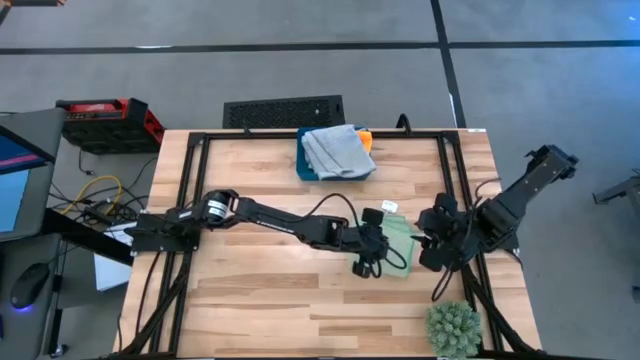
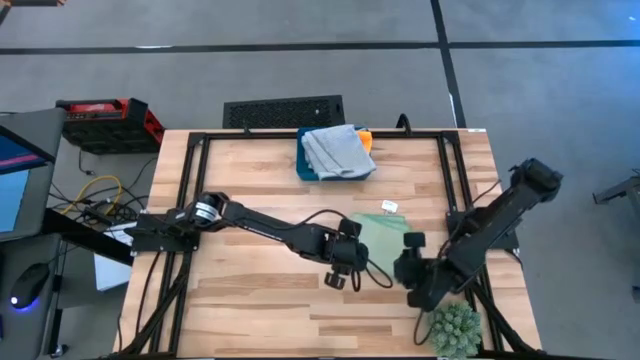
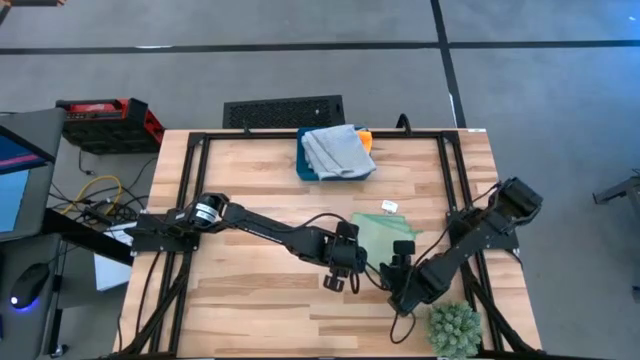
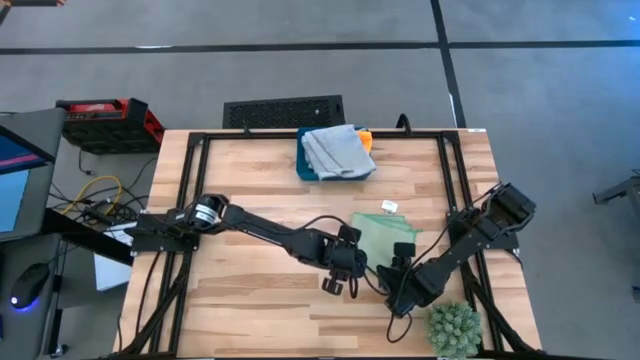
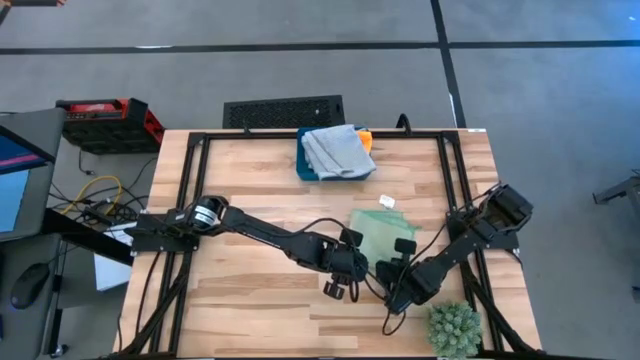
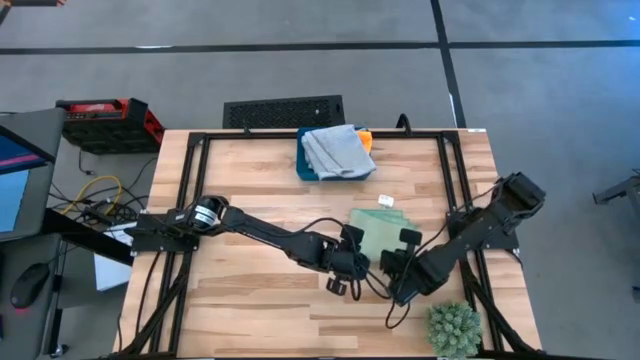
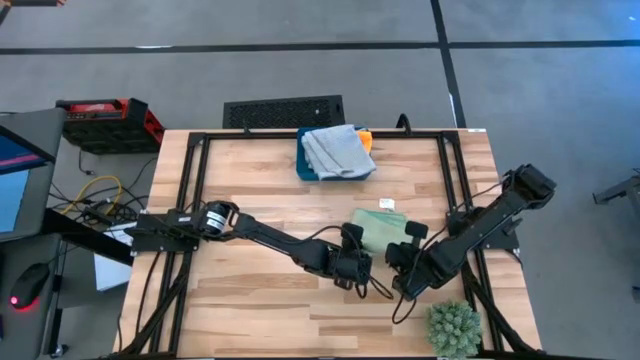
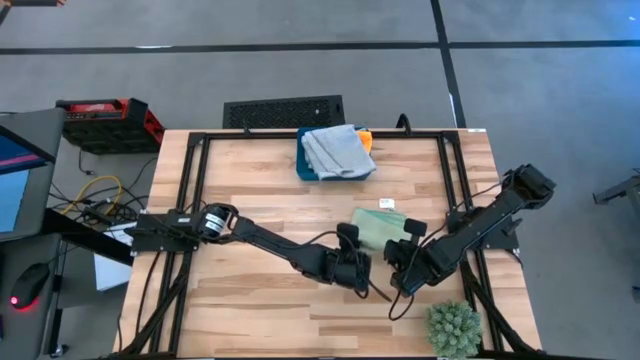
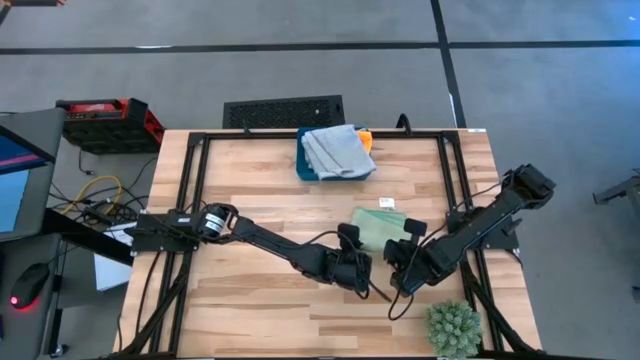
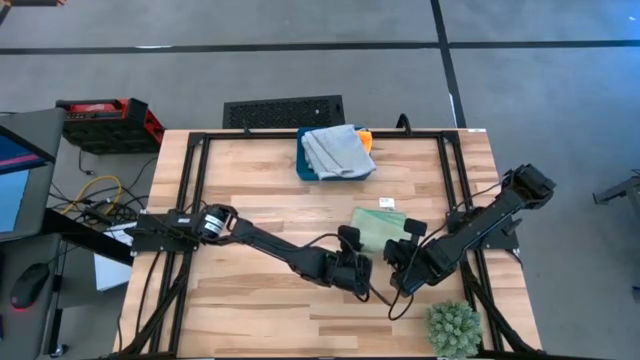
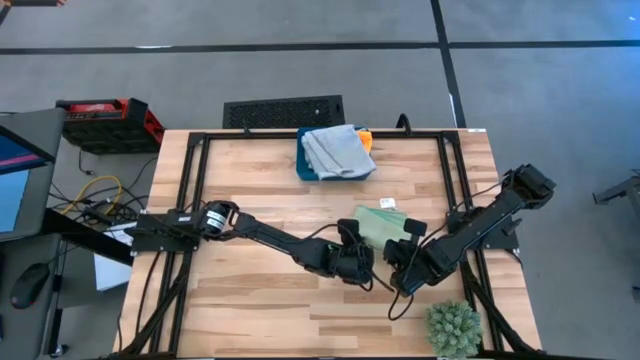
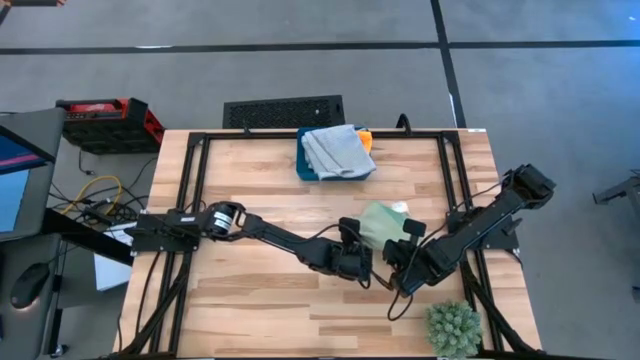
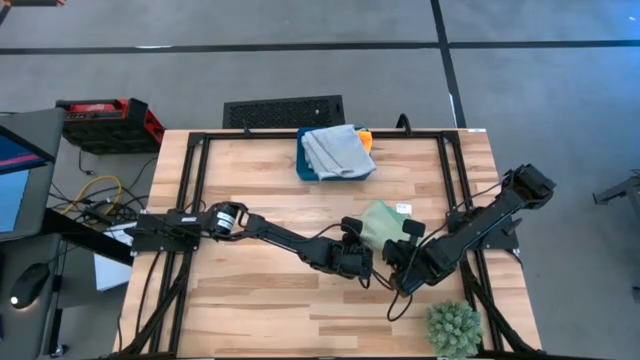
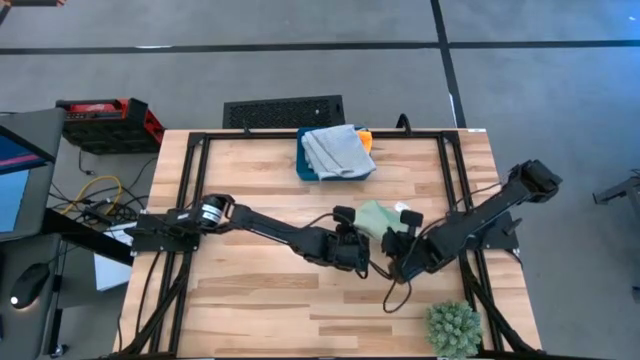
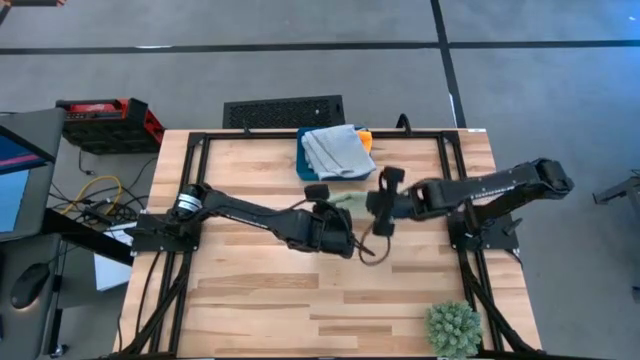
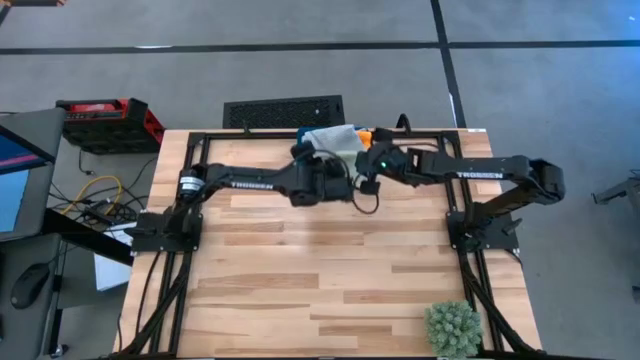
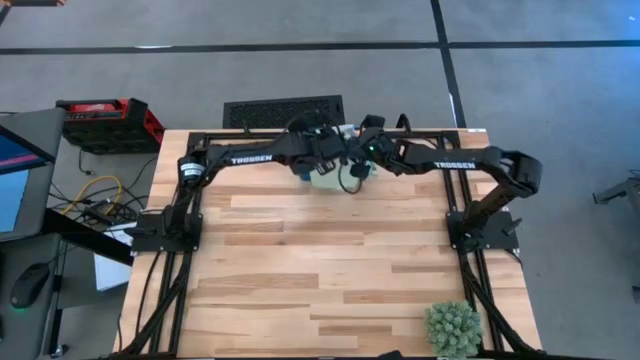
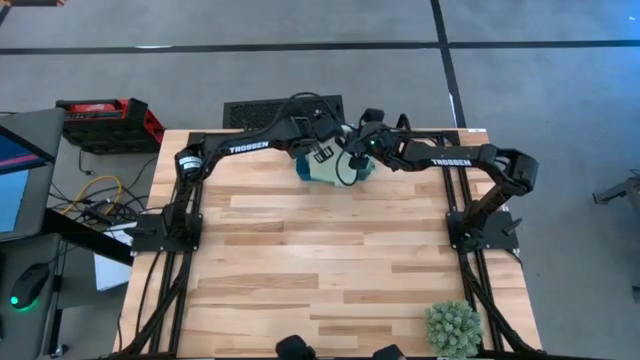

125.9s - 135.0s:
Task: Fold microfiber towels
Put the folded green microfiber cloth into the blue bin

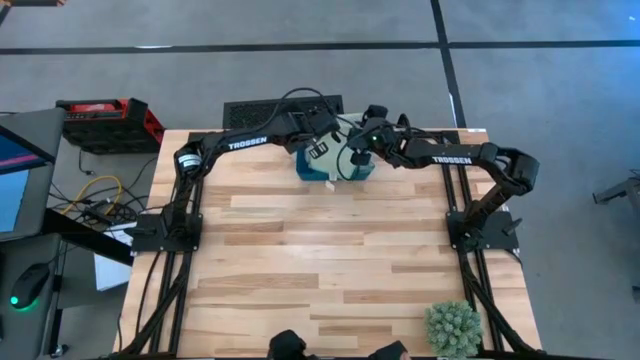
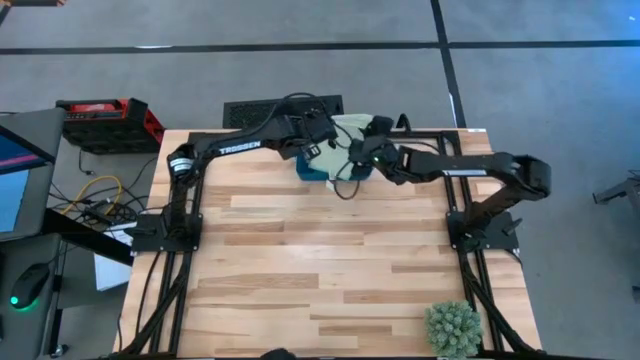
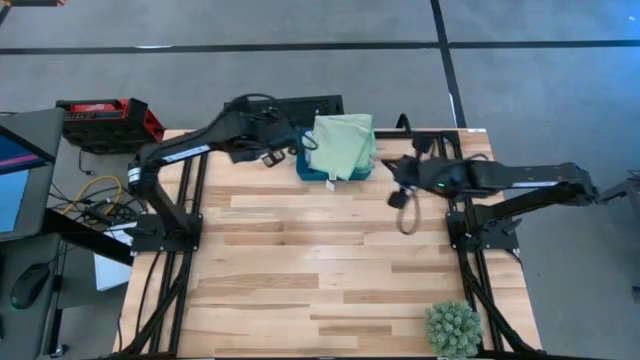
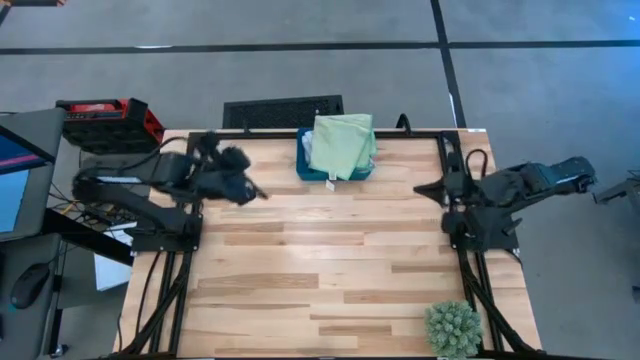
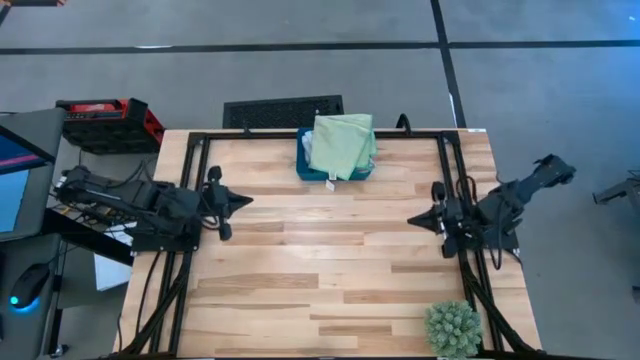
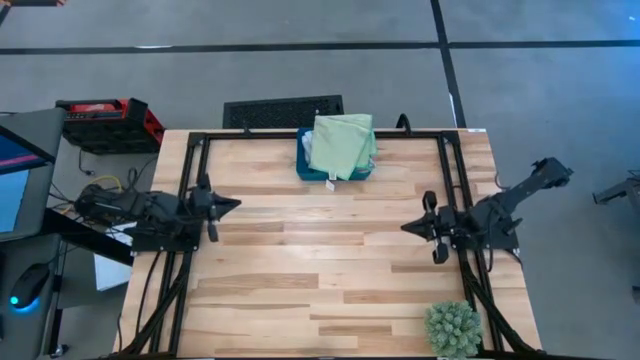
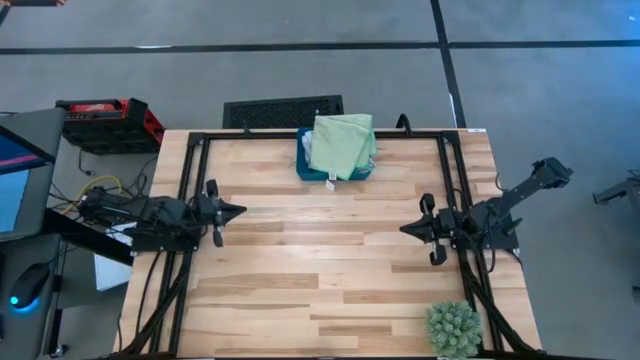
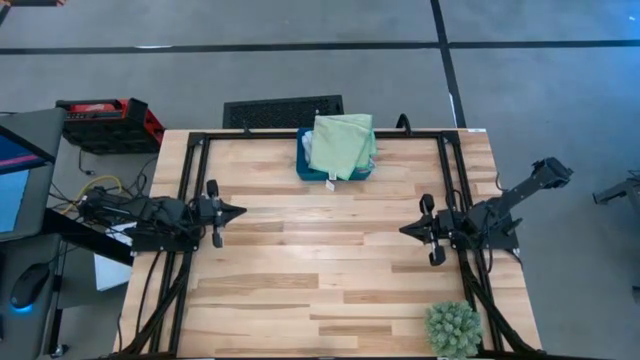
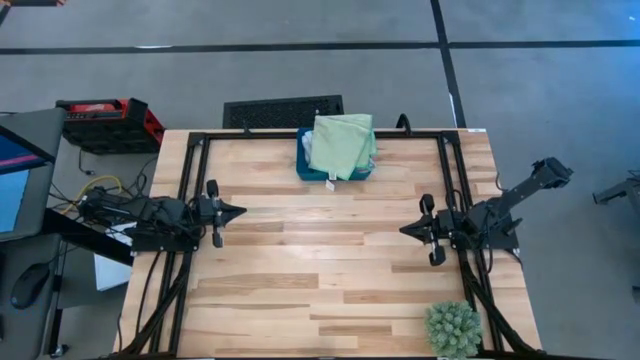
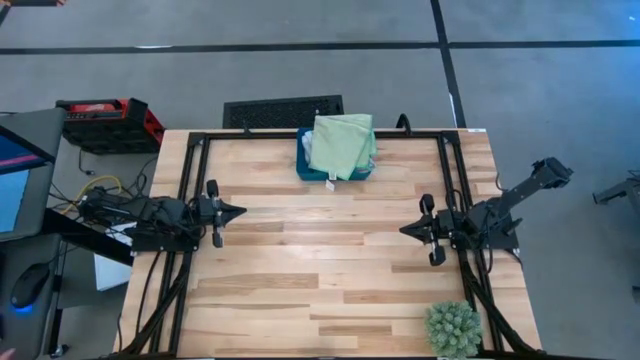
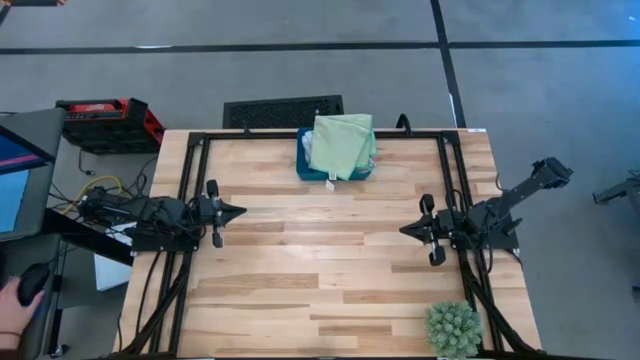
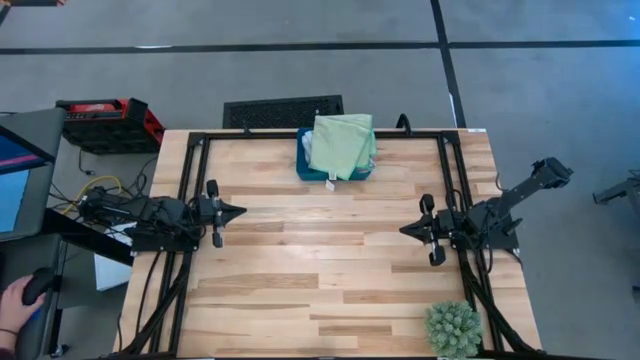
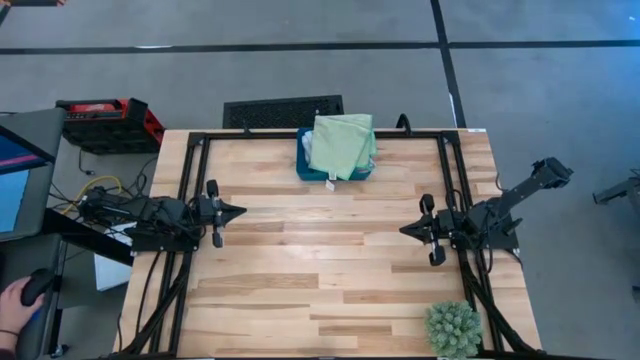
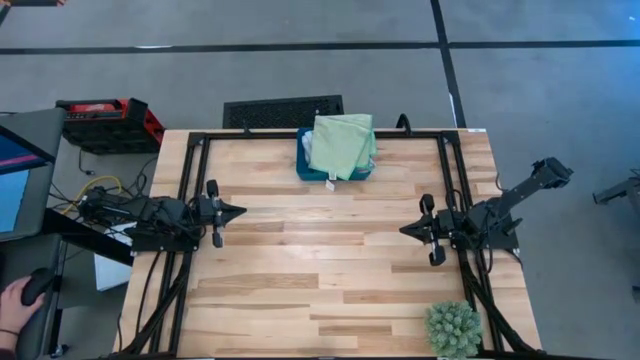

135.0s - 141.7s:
Return to Home Position

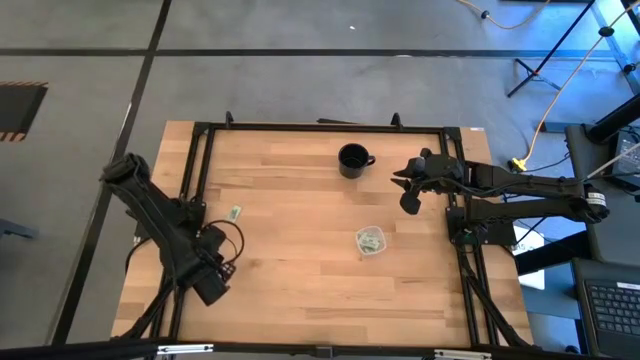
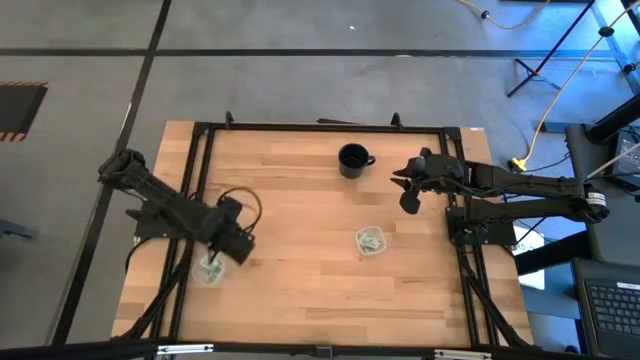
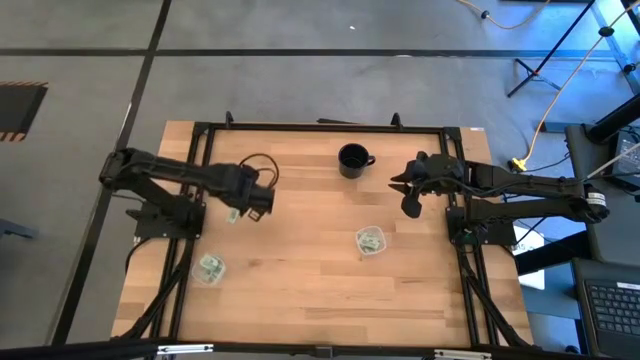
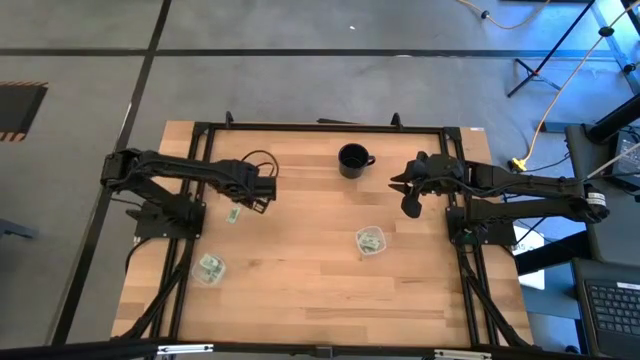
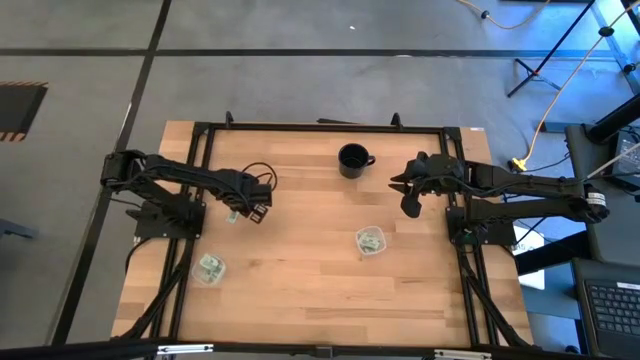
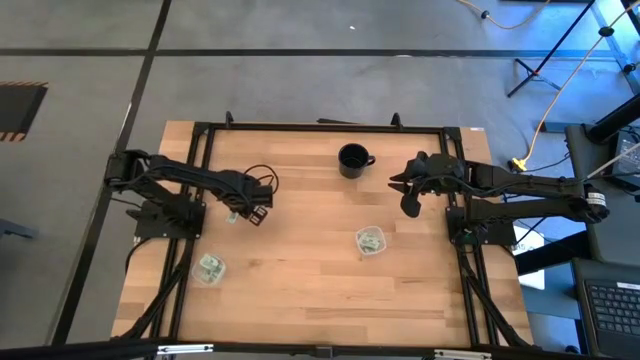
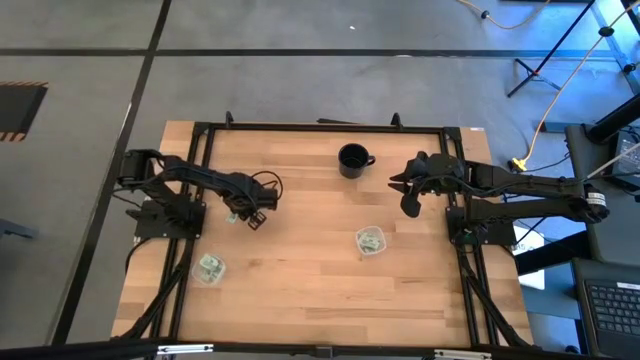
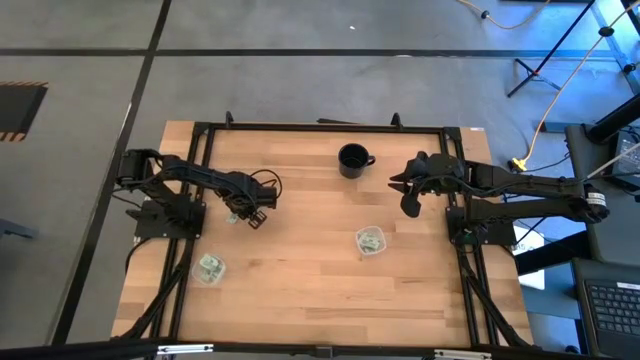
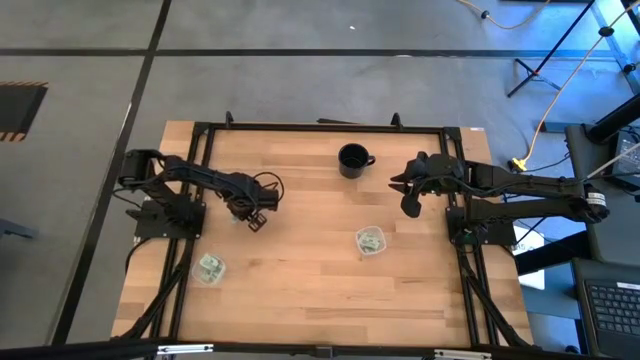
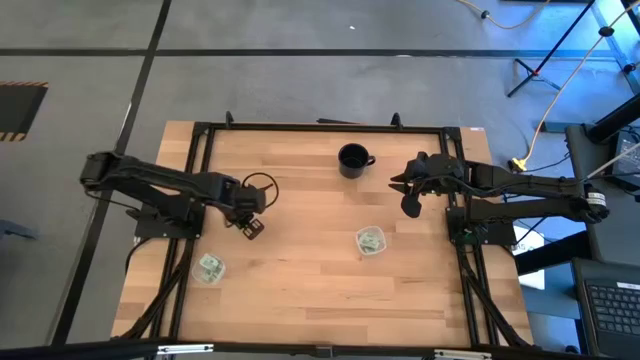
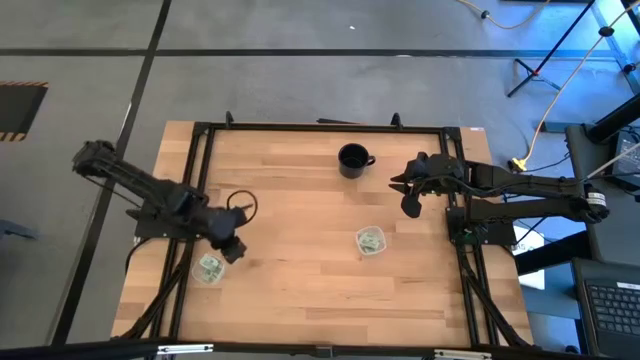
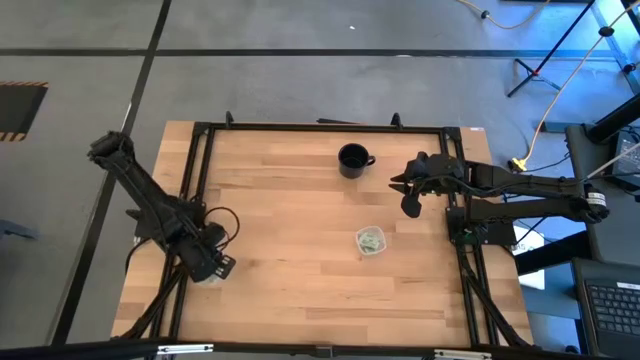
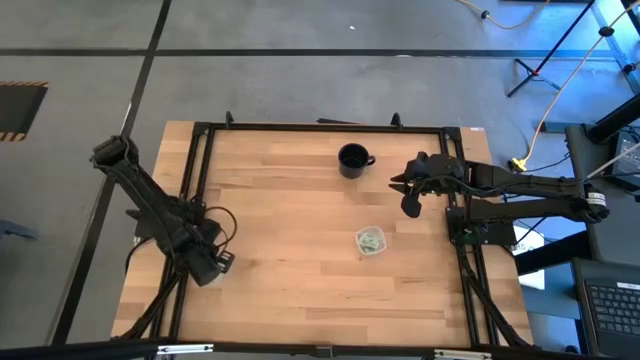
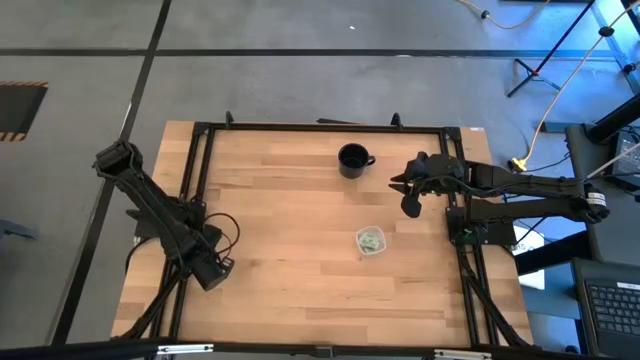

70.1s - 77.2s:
Task: Pick and place Stevia / Truvia into bins
Put the stevia packet into the left transparent container
